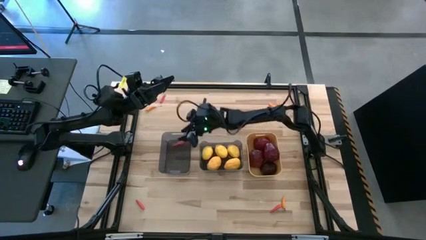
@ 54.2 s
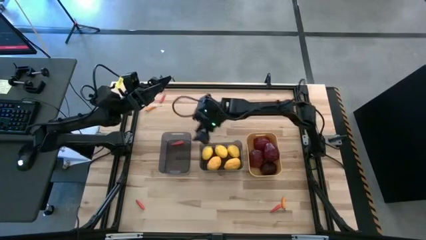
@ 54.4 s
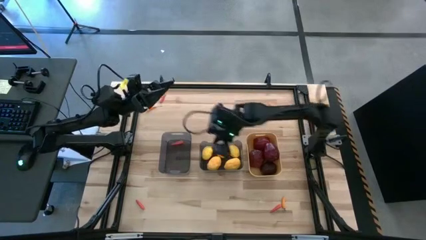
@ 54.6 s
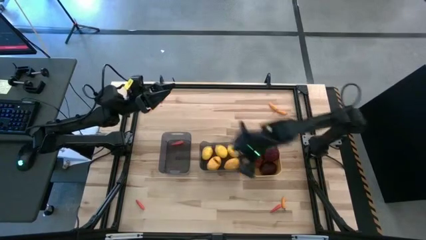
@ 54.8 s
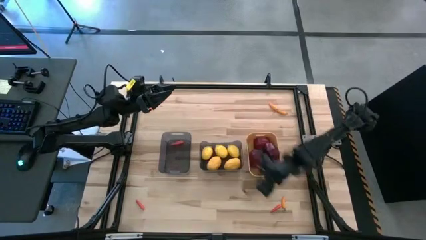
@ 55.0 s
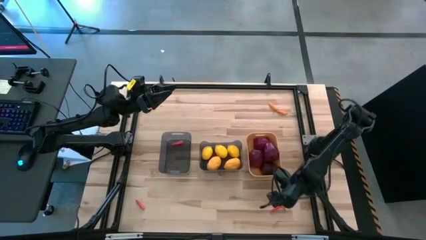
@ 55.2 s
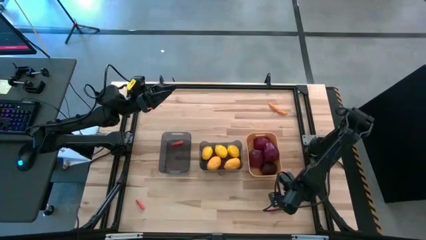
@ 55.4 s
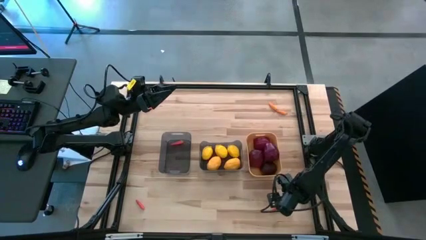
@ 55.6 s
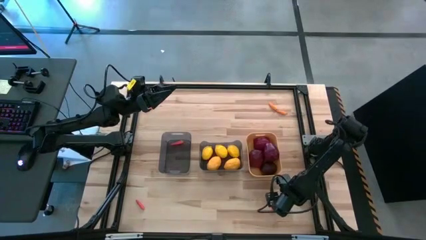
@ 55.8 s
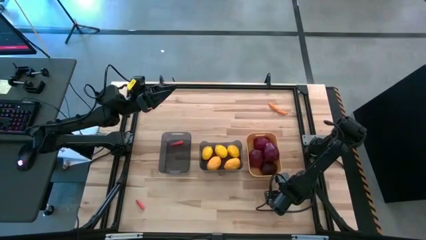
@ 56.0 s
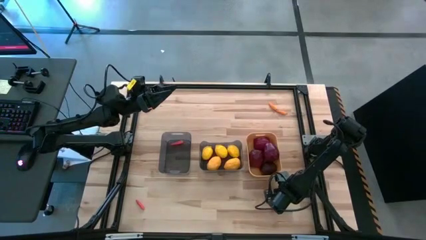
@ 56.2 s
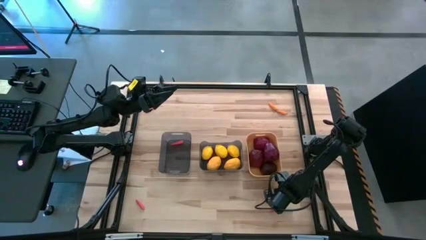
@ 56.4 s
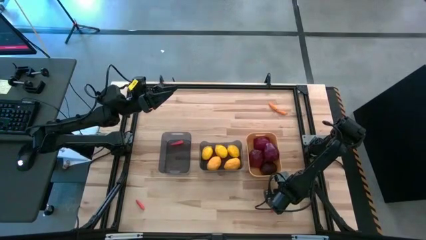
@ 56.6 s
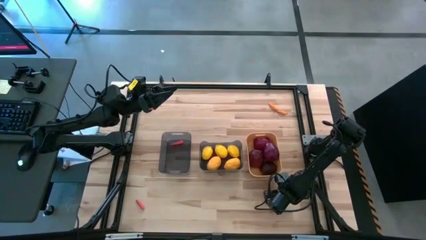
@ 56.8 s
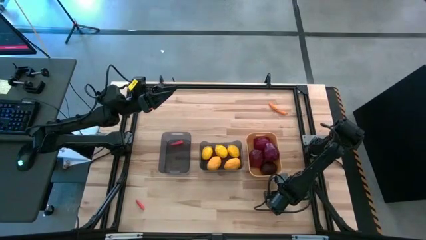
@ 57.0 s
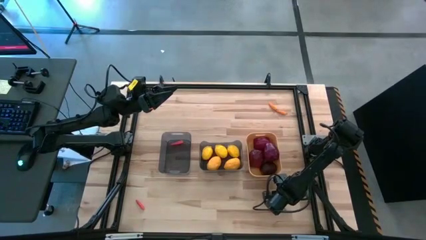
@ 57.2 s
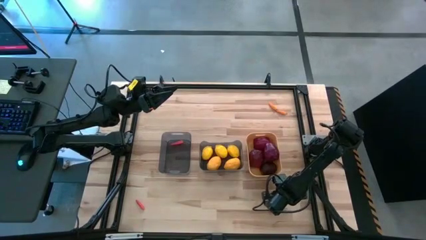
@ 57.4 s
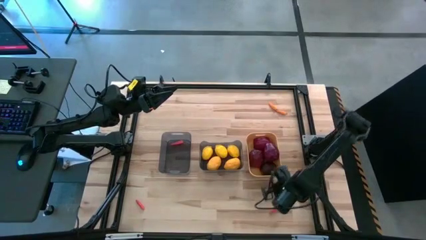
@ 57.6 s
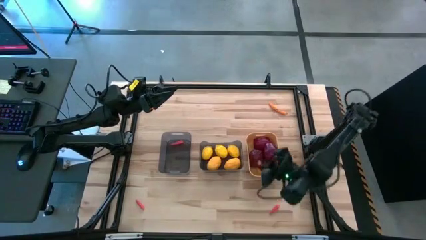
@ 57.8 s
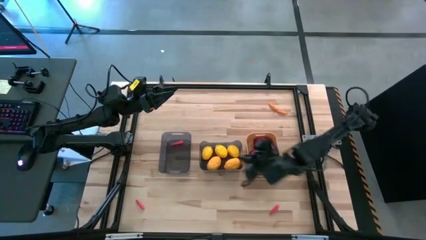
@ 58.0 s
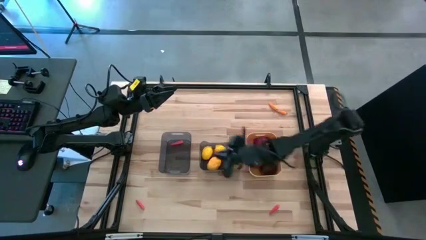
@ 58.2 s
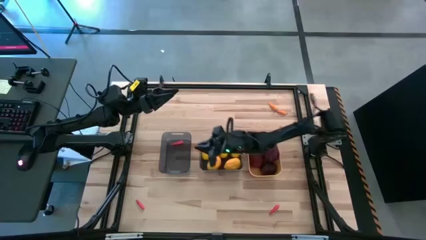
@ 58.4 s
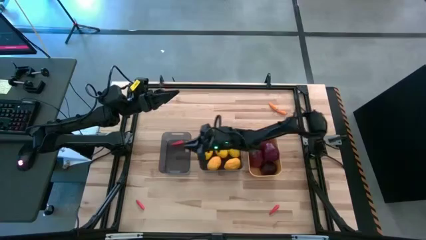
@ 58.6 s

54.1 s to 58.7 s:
Task: Sort produce into baskets
Put the yellow chili pepper into the left black bin

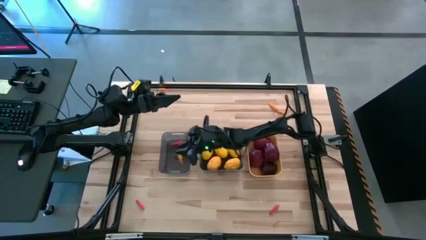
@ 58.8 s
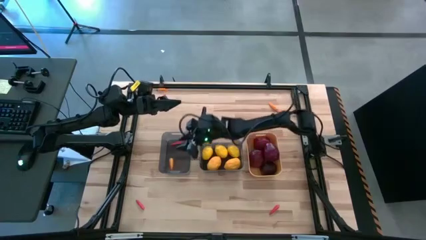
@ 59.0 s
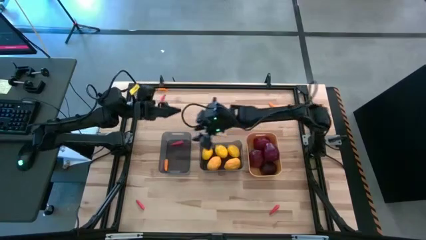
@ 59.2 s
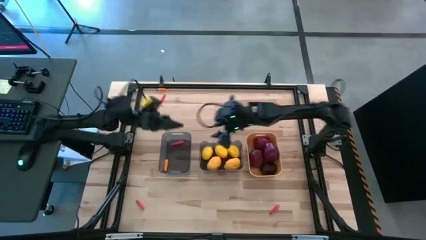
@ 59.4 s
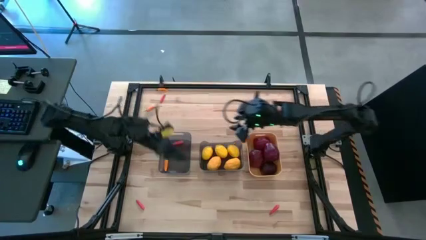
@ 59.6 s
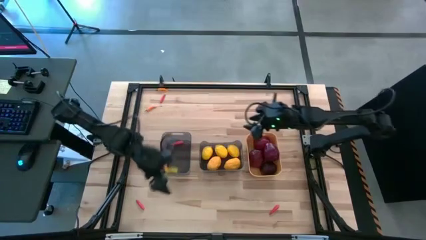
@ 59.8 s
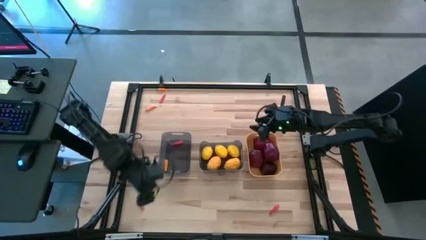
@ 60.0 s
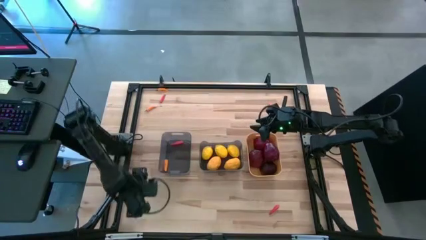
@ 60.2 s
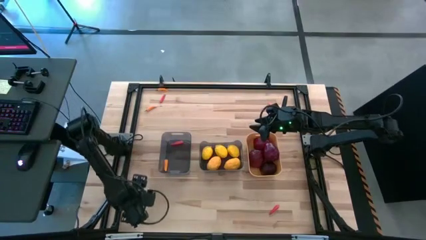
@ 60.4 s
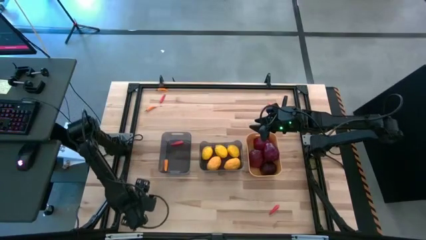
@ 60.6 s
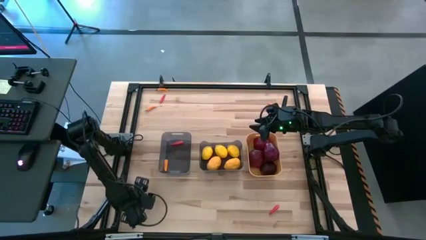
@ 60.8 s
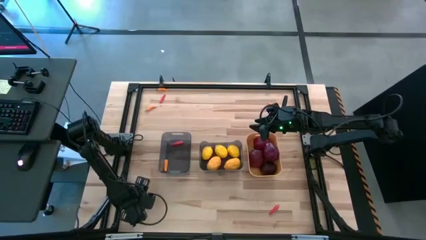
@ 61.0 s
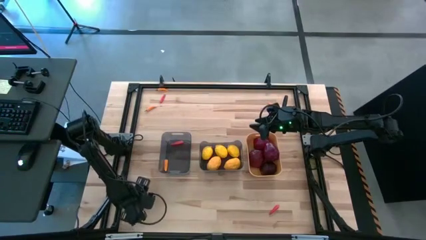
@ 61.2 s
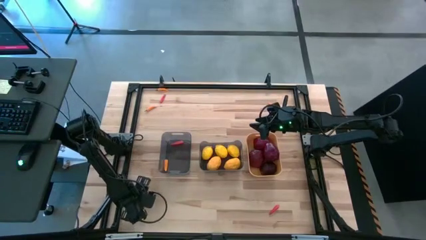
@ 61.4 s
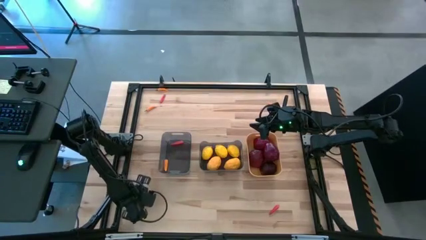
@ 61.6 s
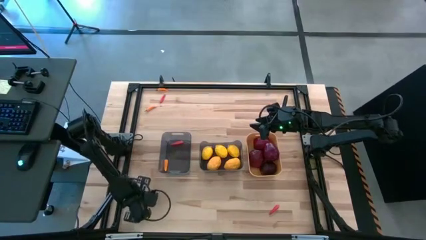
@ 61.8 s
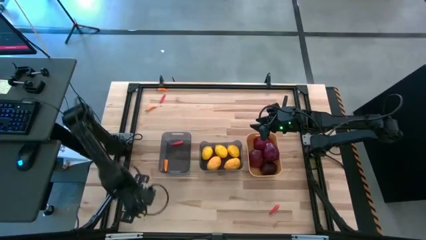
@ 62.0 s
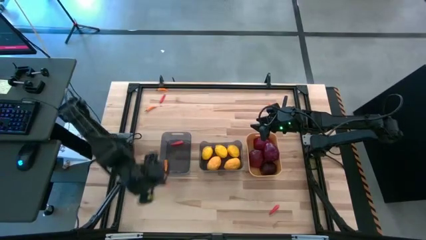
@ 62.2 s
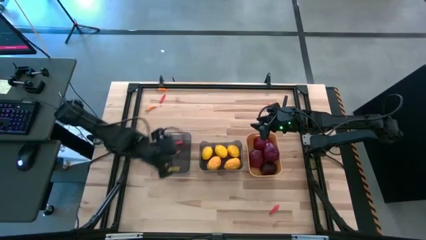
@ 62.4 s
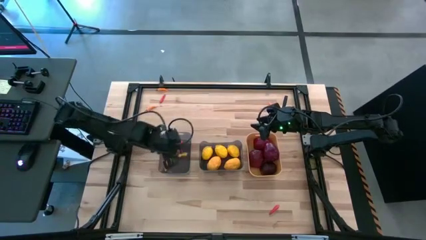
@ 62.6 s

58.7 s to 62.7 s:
Put the orange chili pepper into the left black bin

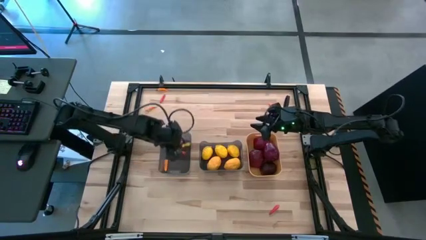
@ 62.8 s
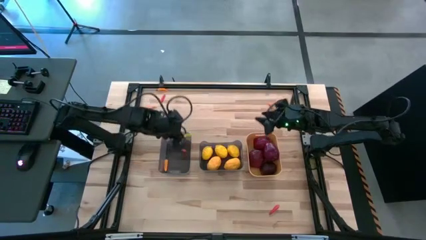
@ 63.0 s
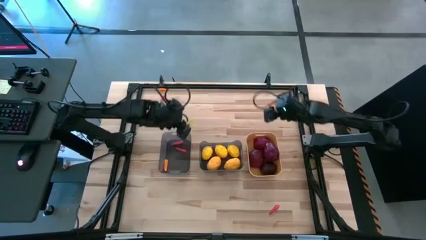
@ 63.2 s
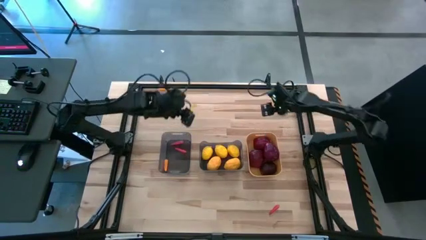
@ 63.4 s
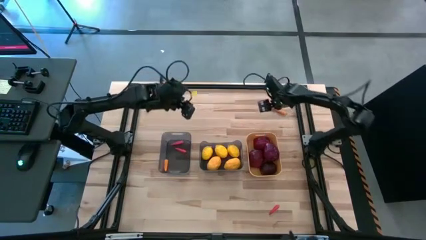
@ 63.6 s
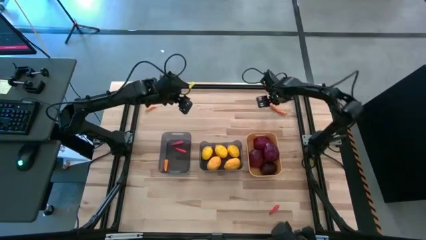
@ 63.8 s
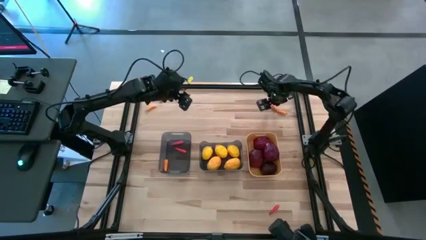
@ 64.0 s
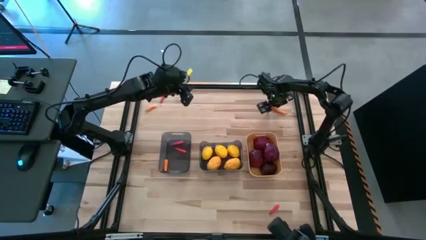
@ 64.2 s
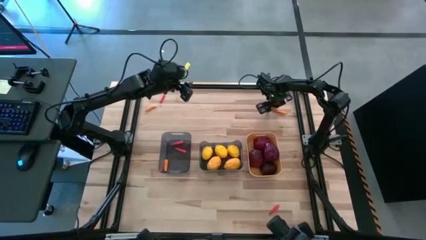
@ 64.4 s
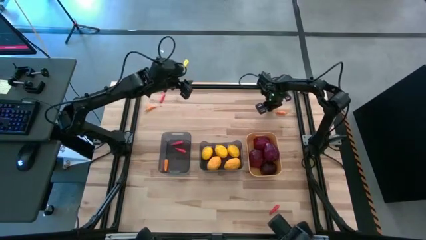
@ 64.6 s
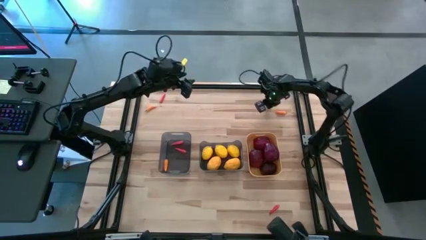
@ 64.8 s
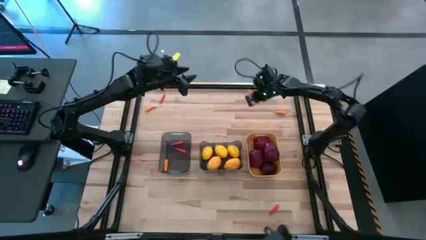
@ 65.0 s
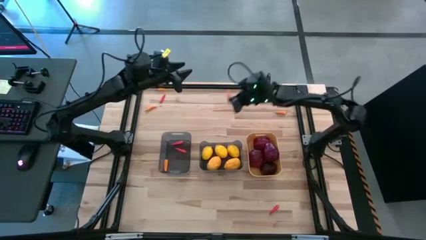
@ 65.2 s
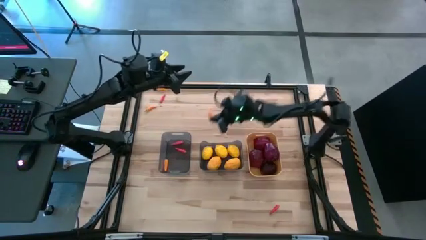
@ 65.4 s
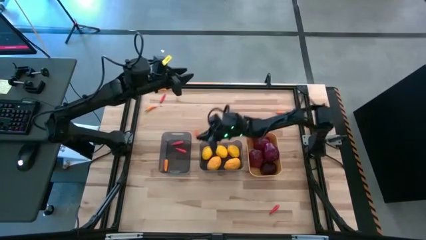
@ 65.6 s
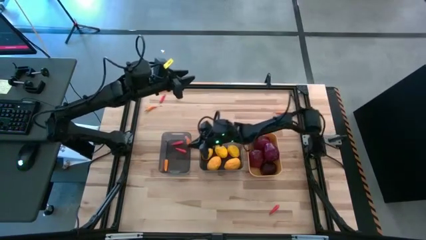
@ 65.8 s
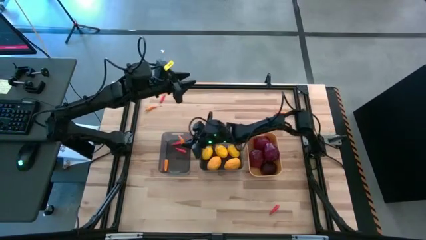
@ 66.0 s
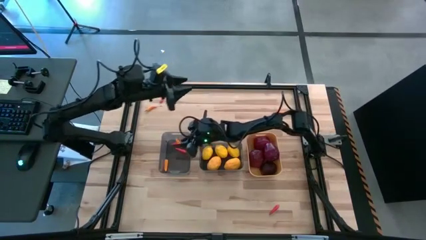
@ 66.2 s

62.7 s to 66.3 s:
Put the yellow chili pepper into the left black bin

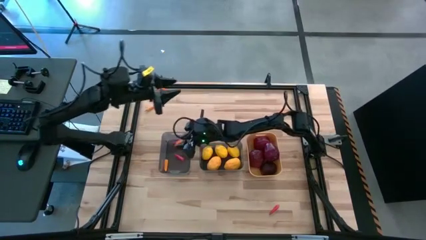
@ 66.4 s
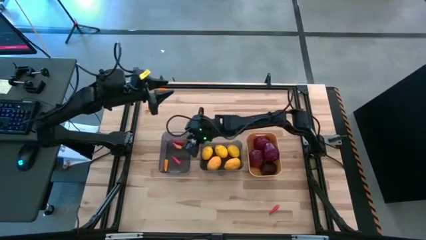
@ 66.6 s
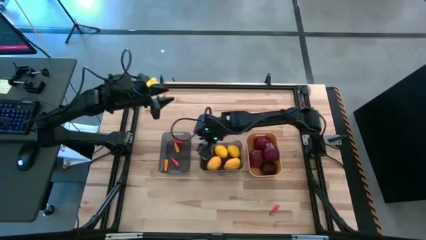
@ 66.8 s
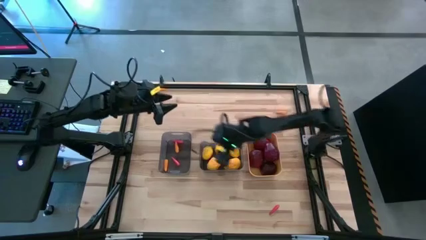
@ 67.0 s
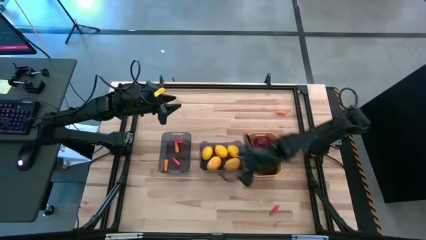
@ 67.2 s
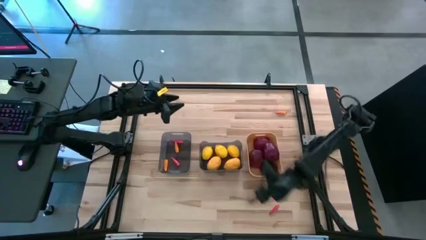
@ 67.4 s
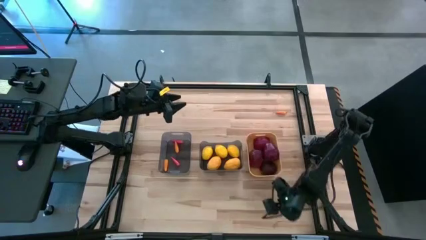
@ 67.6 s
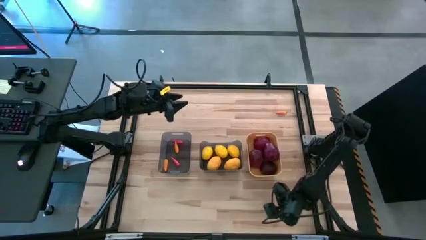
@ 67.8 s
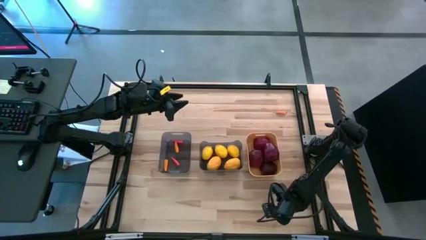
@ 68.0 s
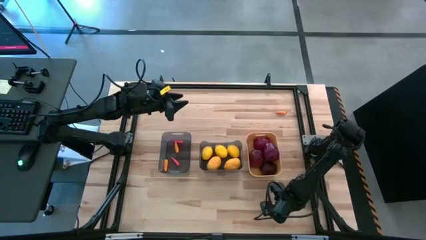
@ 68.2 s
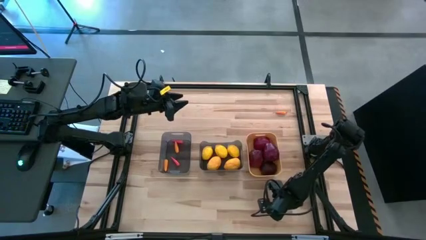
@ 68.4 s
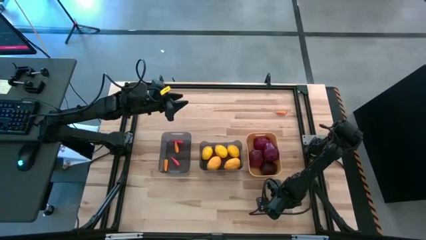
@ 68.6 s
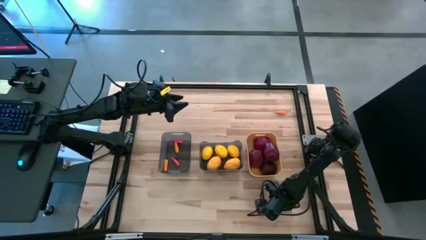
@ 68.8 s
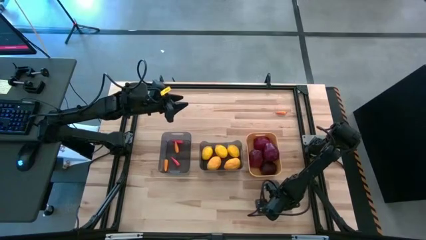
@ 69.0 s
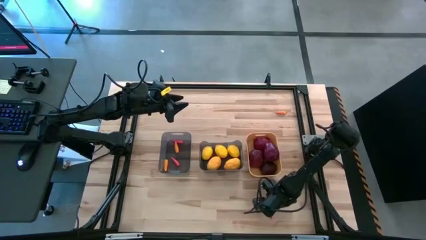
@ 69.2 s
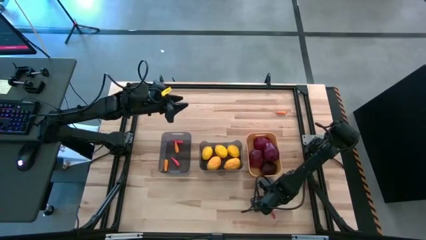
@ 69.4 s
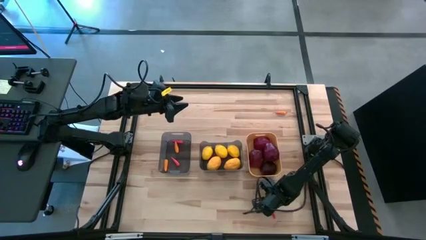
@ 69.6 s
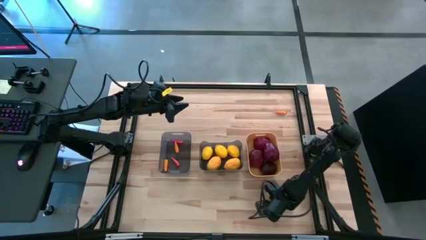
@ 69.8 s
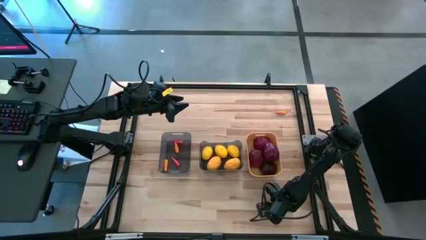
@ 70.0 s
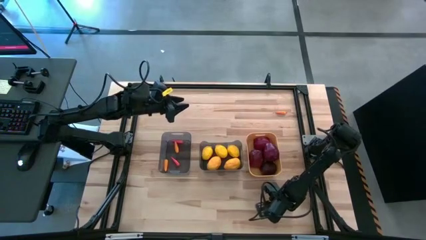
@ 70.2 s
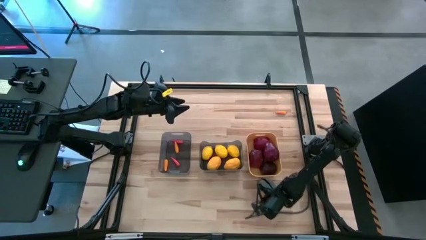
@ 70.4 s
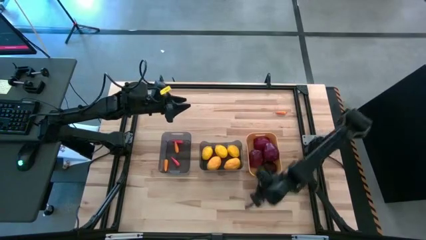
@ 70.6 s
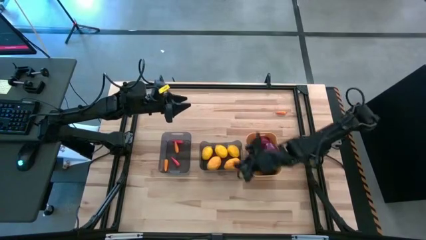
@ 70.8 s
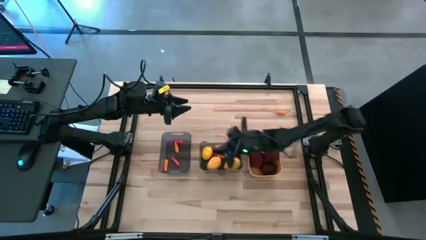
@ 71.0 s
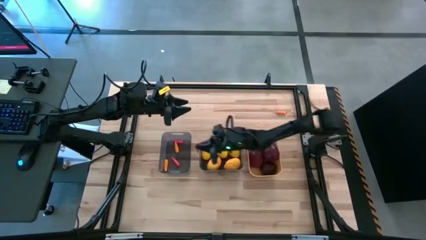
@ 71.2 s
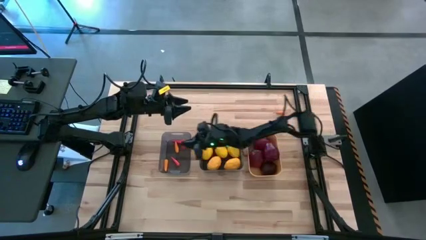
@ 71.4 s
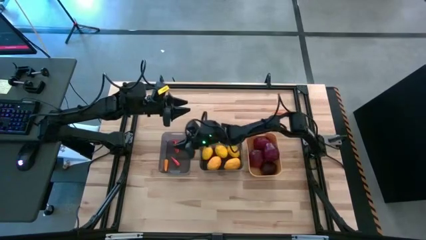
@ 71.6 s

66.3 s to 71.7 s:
Put the orange chili pepper into the left black bin

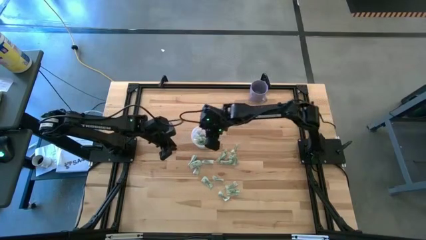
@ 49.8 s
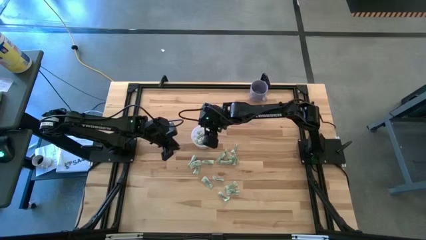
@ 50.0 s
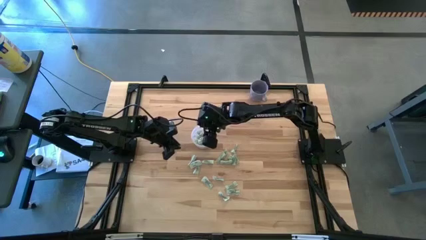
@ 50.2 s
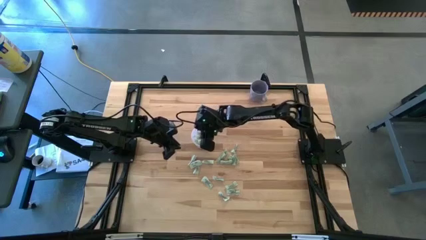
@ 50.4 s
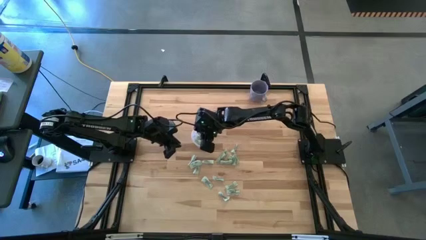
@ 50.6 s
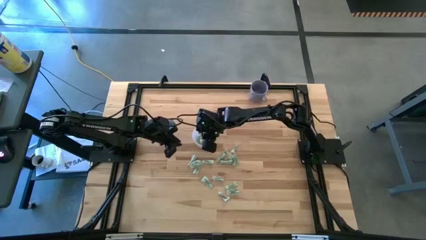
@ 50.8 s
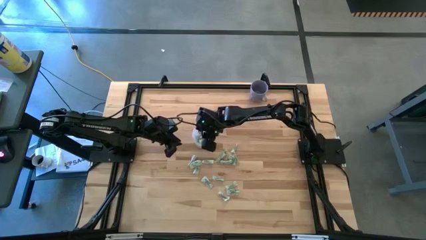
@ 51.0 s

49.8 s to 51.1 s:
Task: Pick and place Stevia / Truvia into bins
Adjust the white stevia packet in the transparent container
